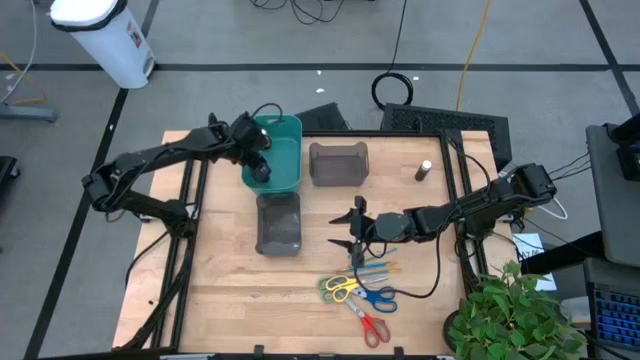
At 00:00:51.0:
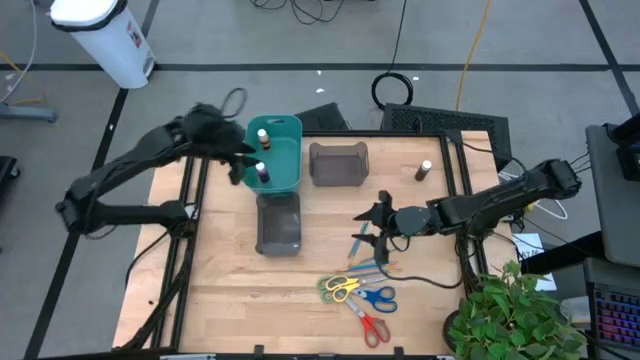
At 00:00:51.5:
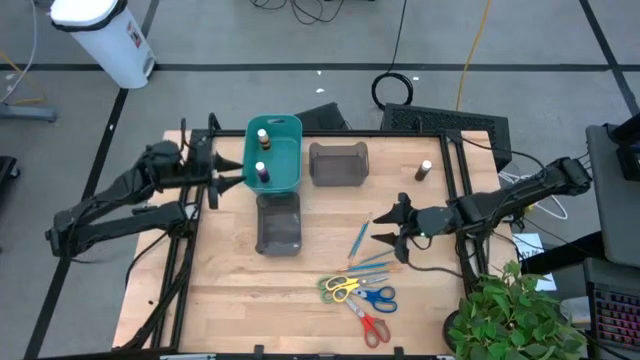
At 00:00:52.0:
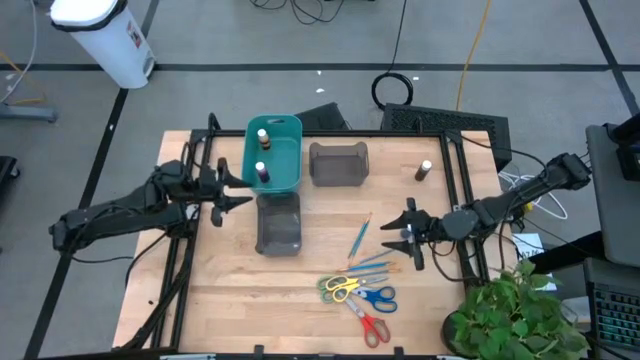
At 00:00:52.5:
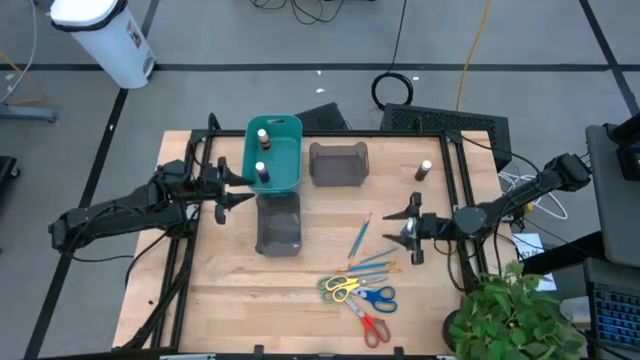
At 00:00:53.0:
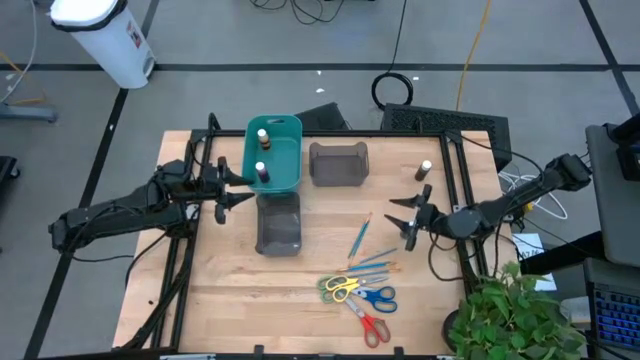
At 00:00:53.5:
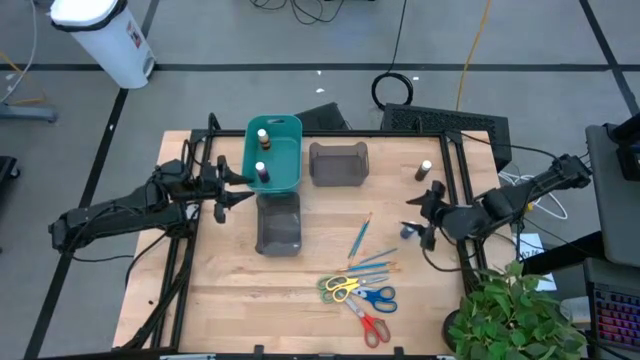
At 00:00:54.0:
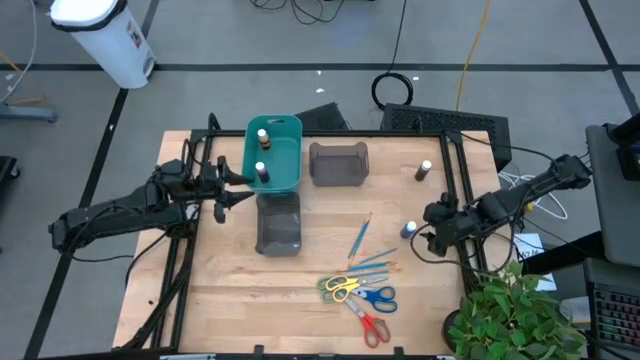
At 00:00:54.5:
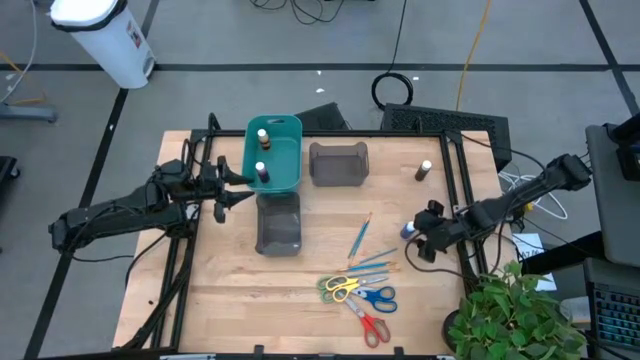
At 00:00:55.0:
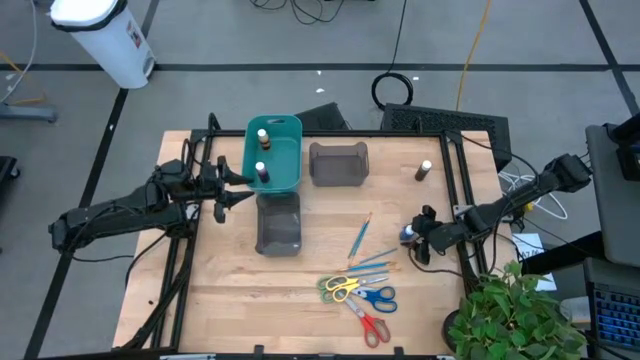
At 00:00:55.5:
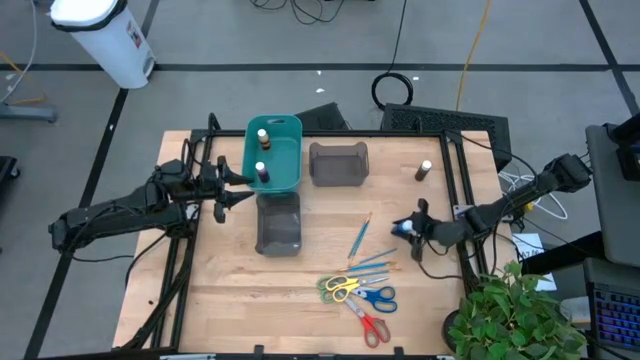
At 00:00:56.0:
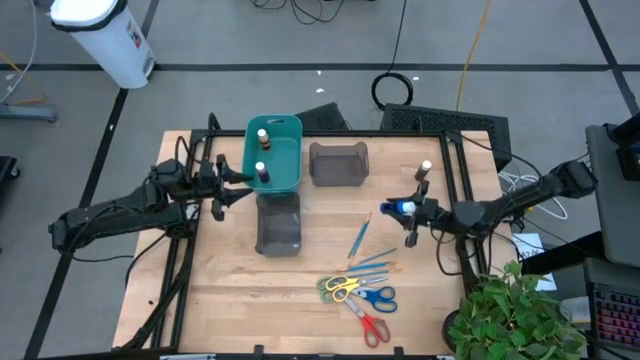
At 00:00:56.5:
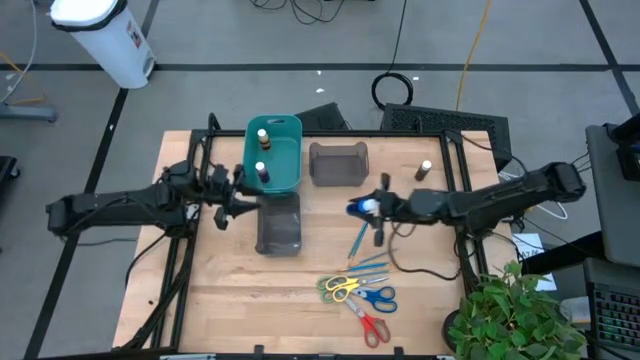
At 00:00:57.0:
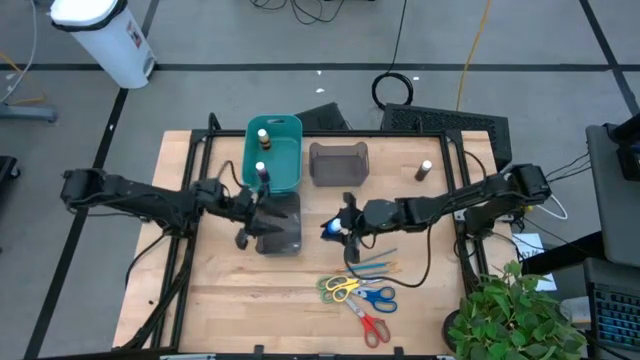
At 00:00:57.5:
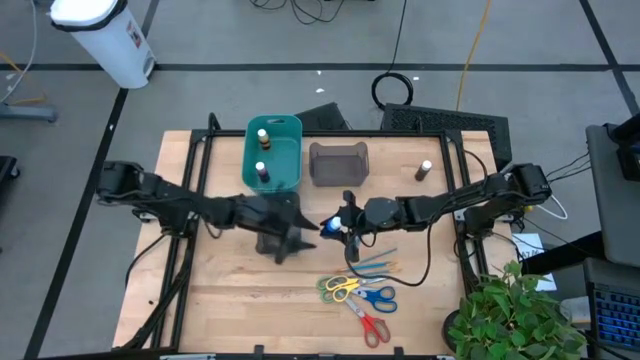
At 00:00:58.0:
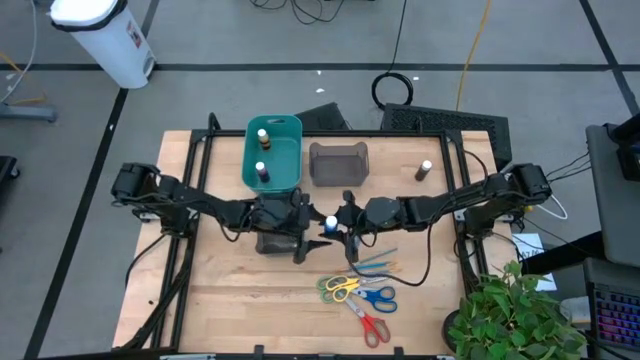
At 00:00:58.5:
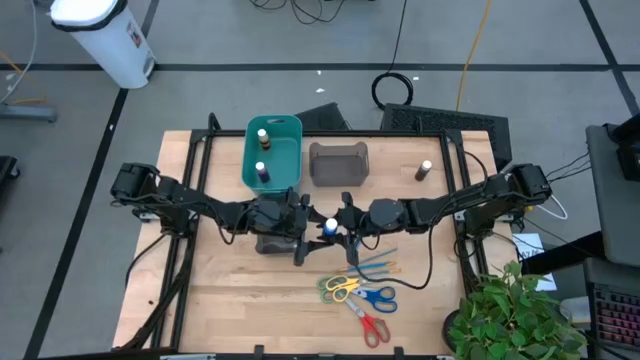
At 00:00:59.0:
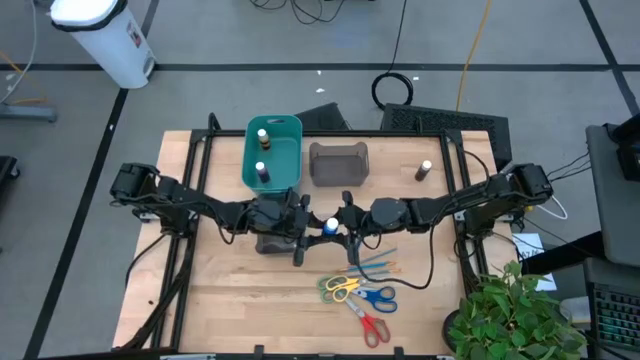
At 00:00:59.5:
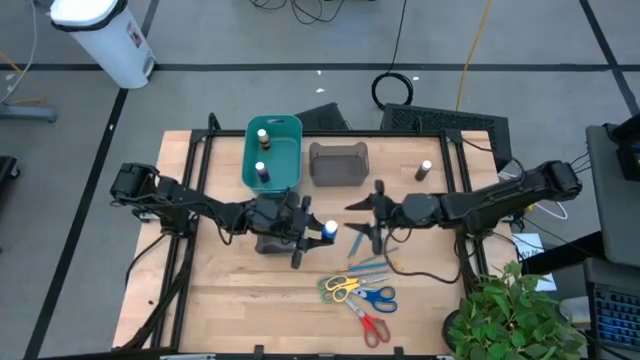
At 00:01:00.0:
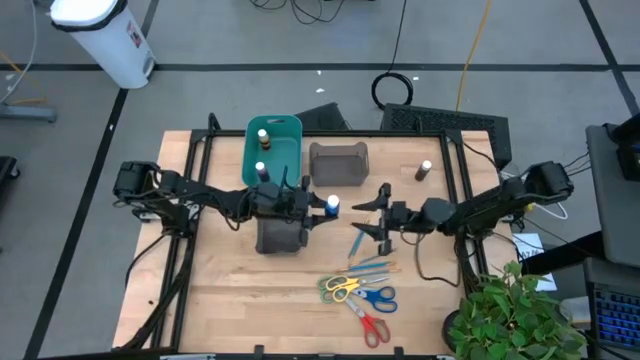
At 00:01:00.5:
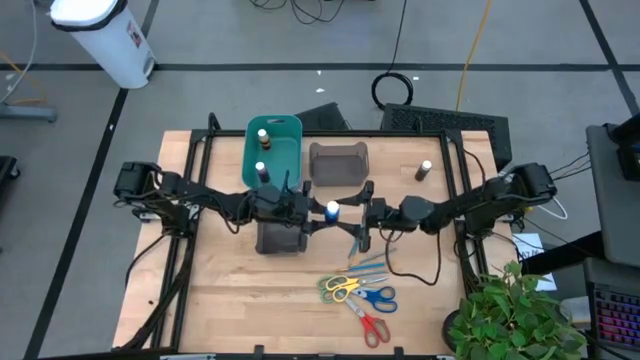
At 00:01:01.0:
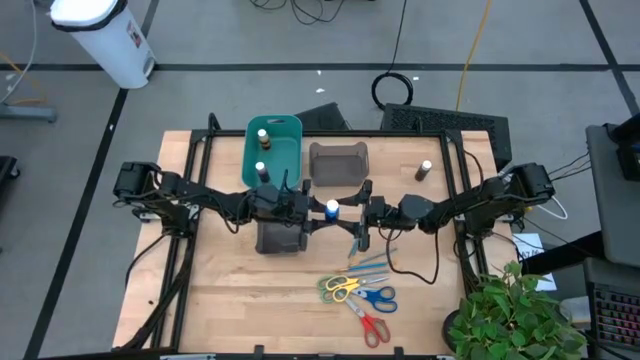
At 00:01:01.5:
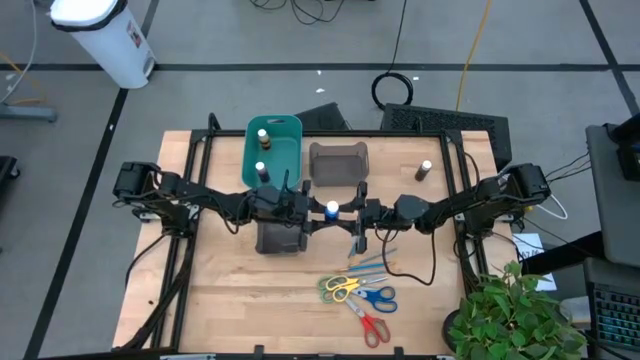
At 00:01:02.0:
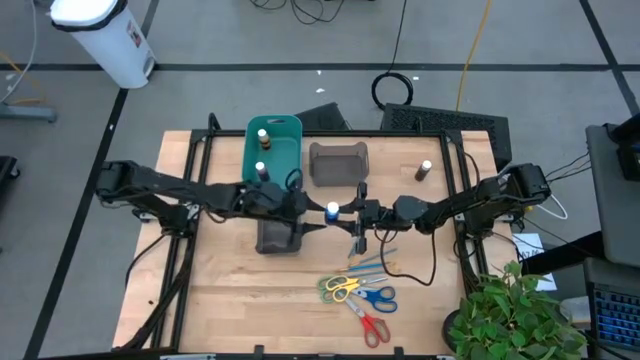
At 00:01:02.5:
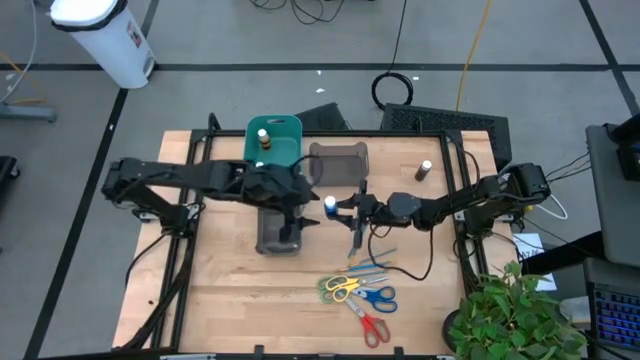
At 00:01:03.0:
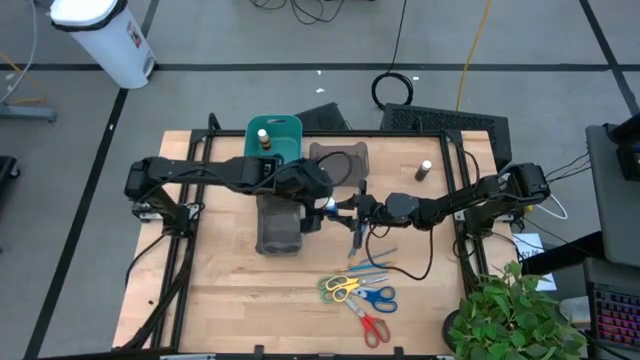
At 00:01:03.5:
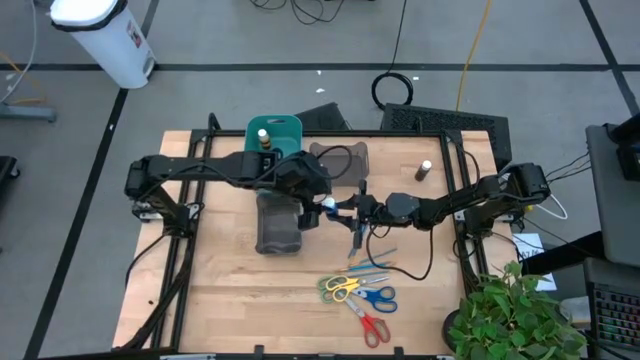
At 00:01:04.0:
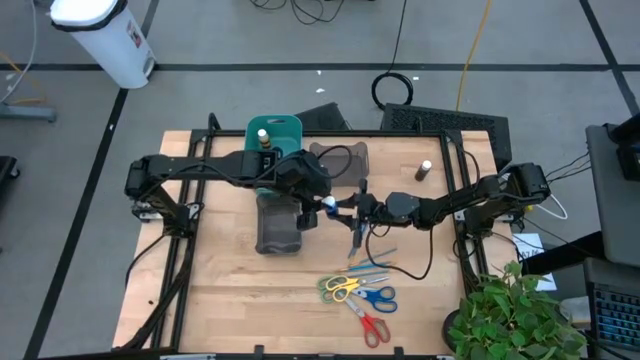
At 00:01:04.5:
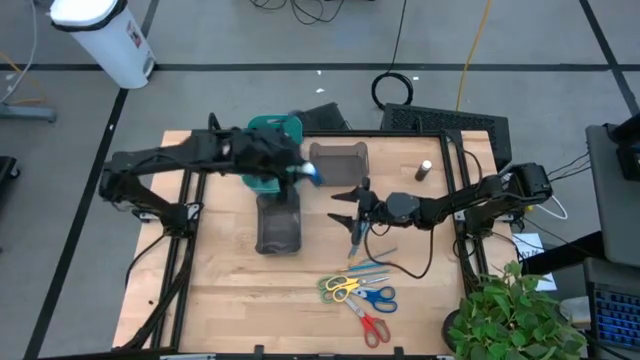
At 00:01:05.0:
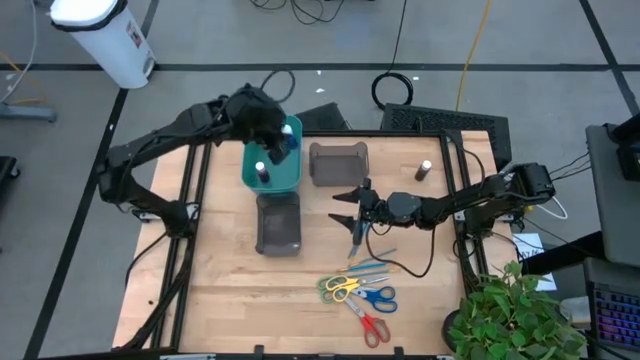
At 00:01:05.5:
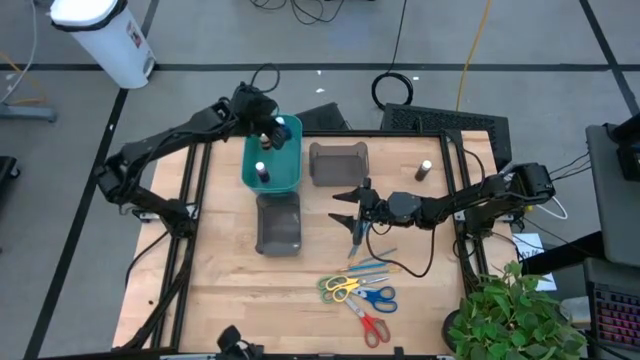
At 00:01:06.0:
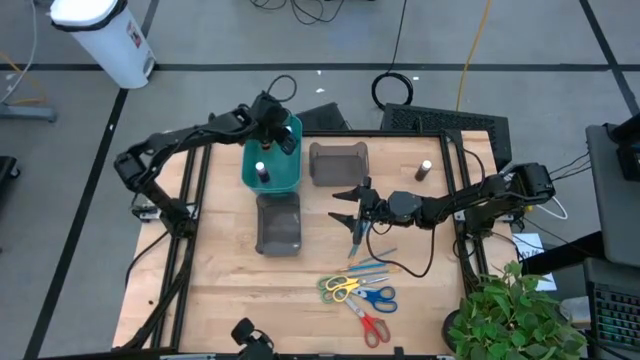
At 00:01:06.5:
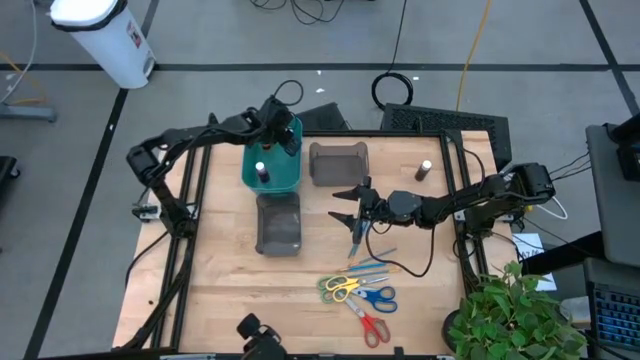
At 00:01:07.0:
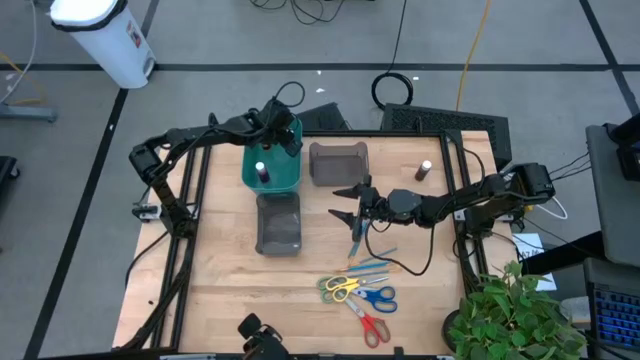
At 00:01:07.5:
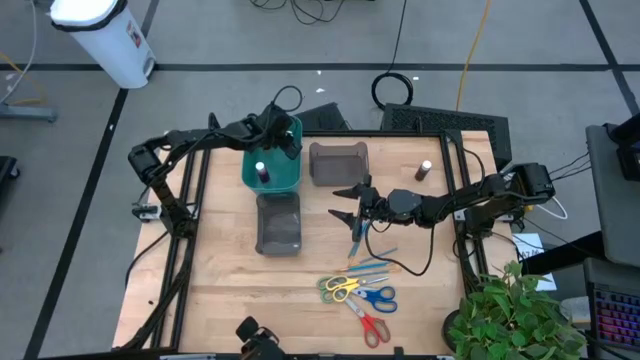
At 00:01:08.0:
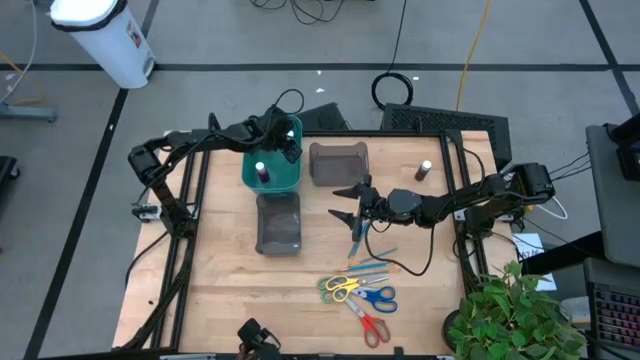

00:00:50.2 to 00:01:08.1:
Task: Pick & Place Paint Supplies
Put the blue paint bottle into the blue bin
